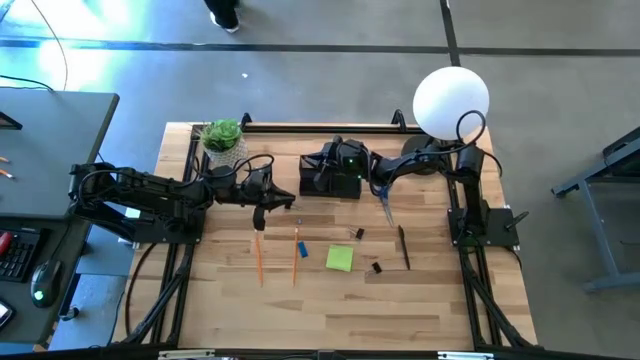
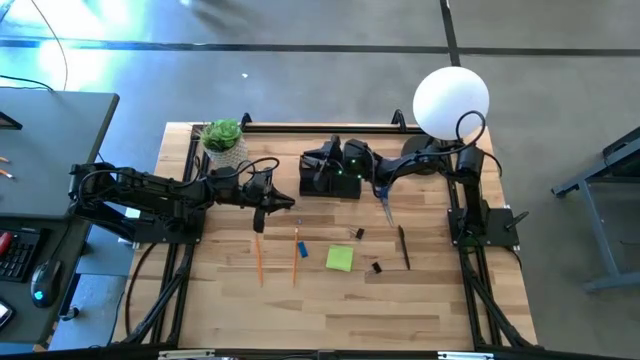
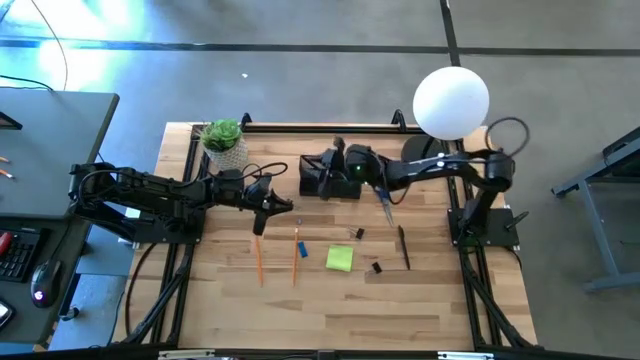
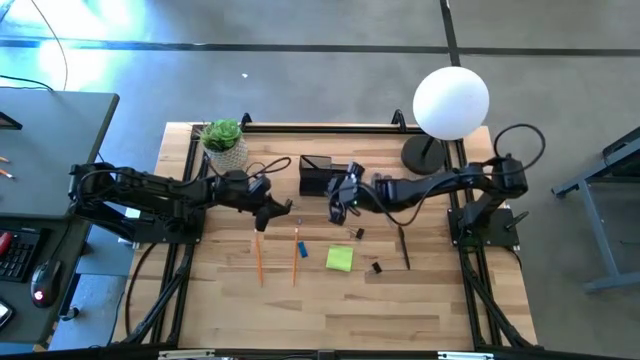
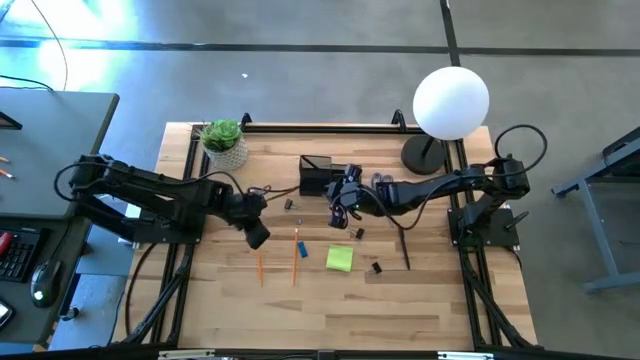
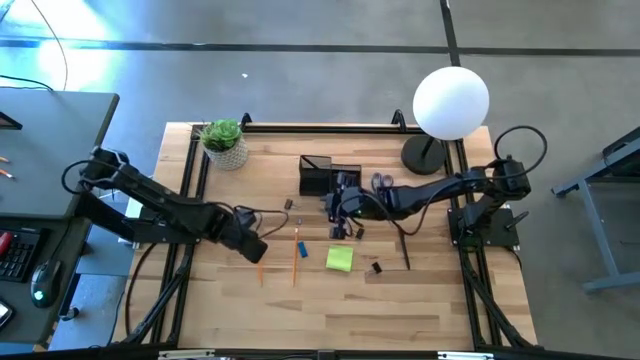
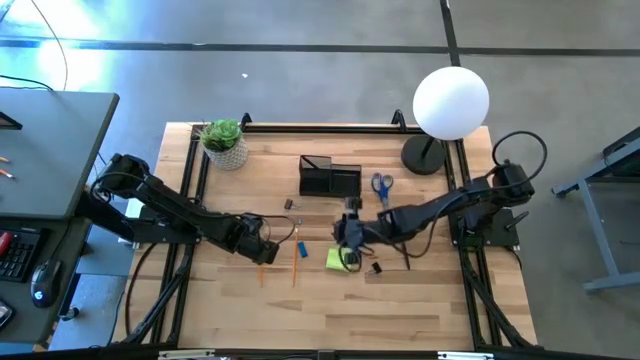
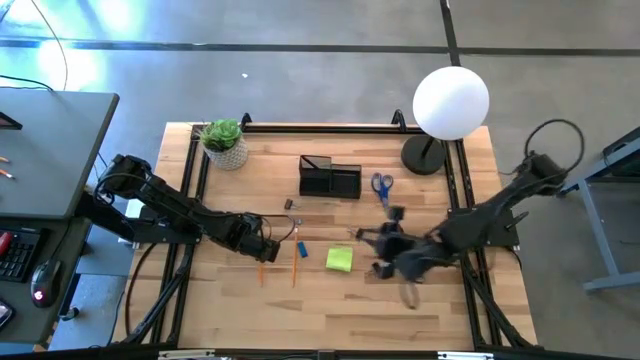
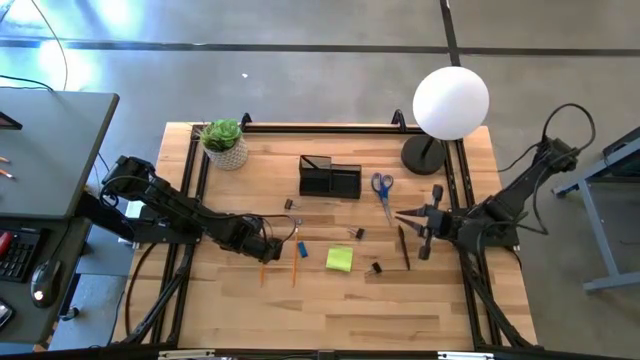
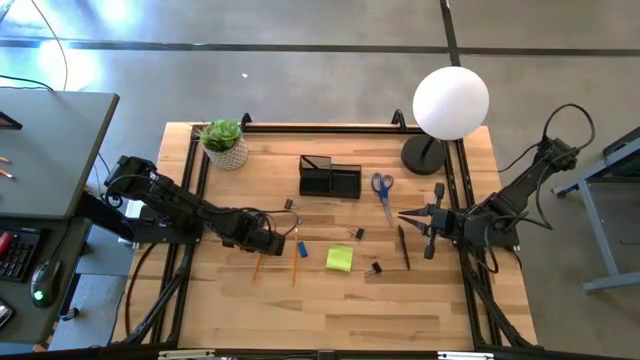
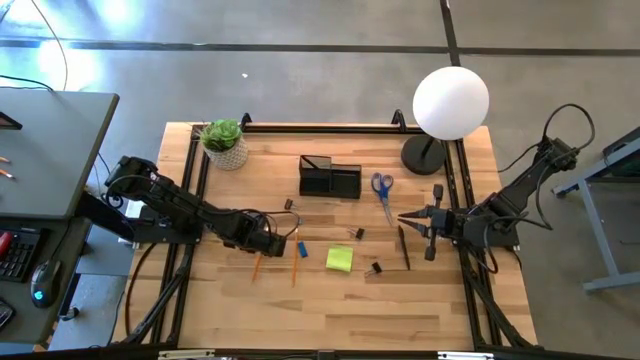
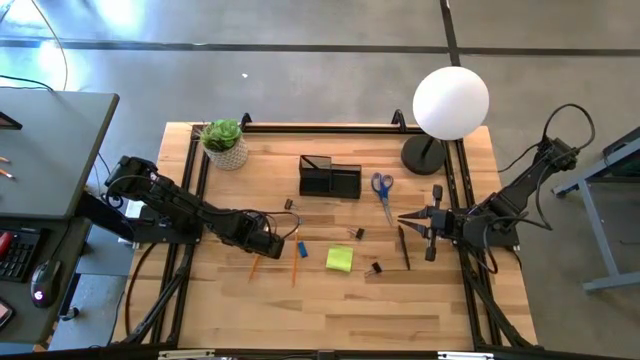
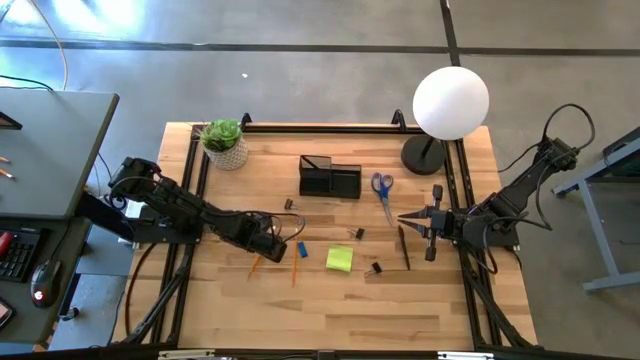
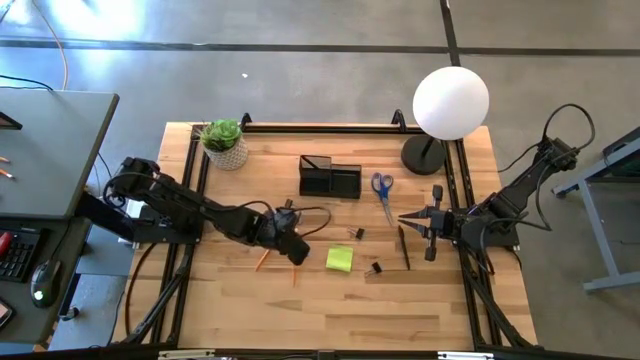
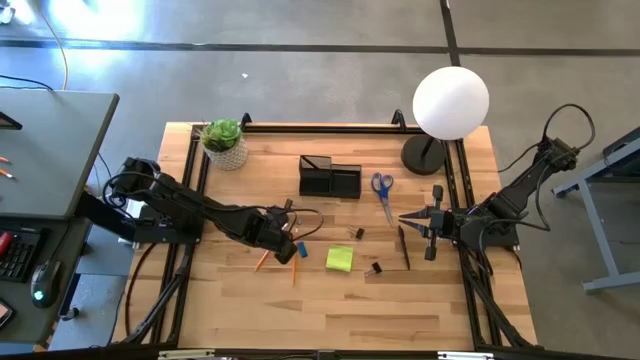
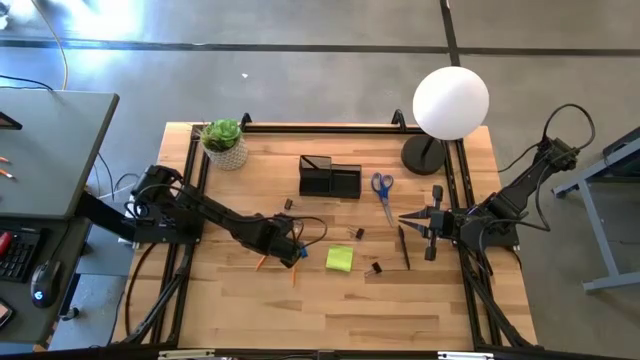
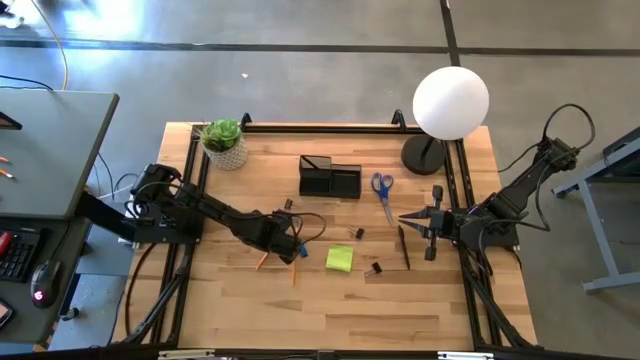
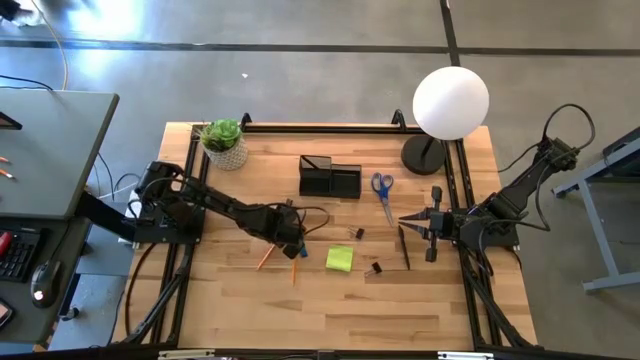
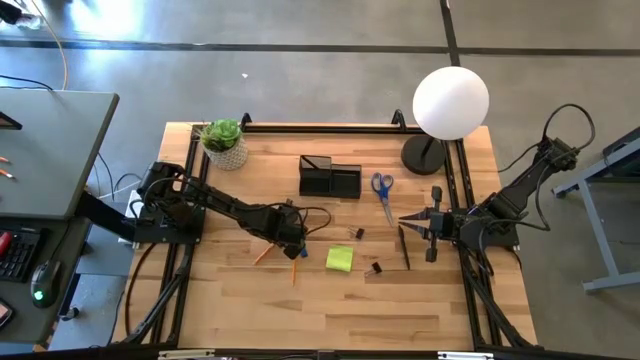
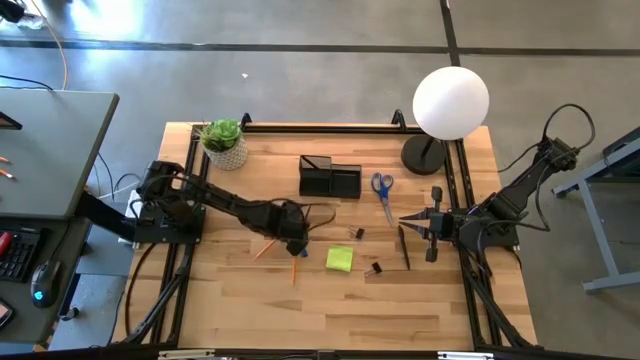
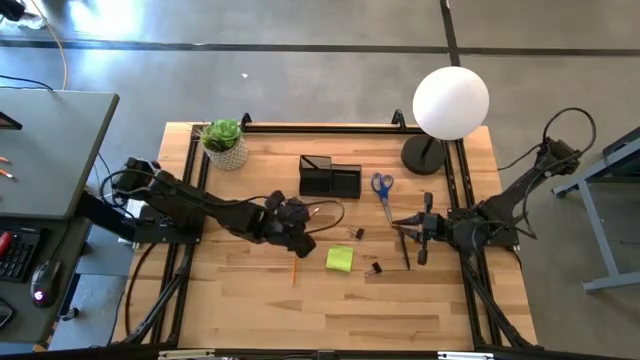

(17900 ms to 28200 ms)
Task: Pick and place office supplies into organizer
Put the orange pencil into the black desk organizer

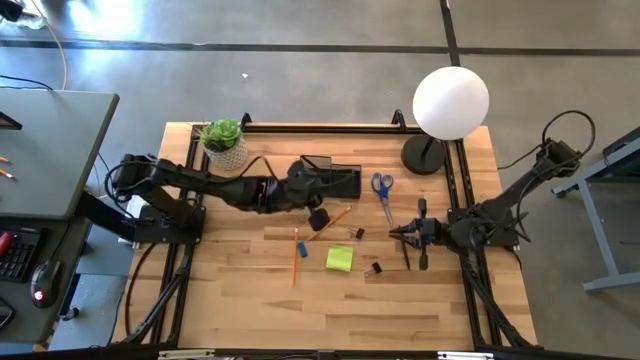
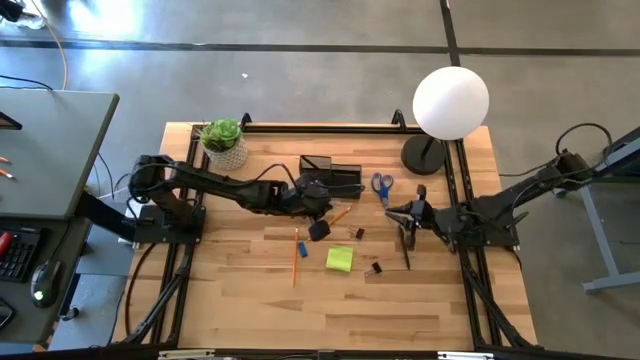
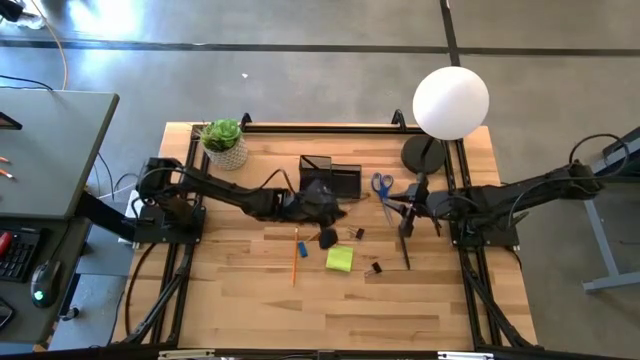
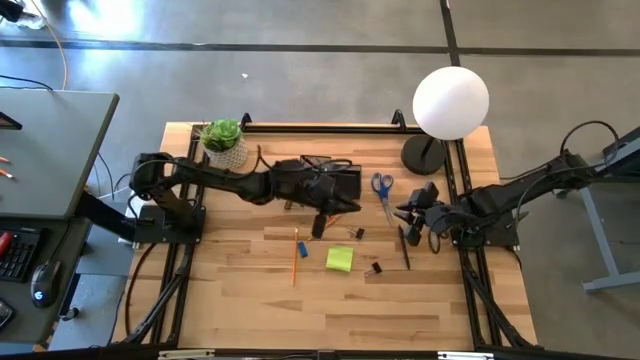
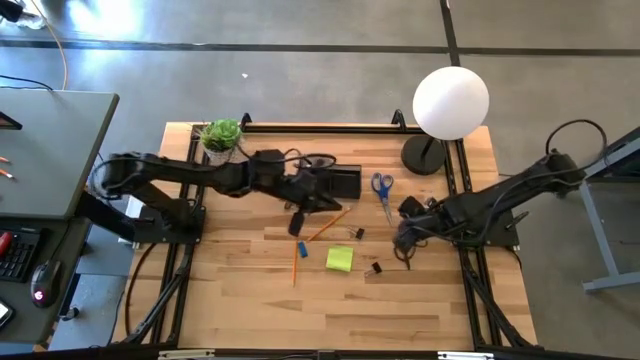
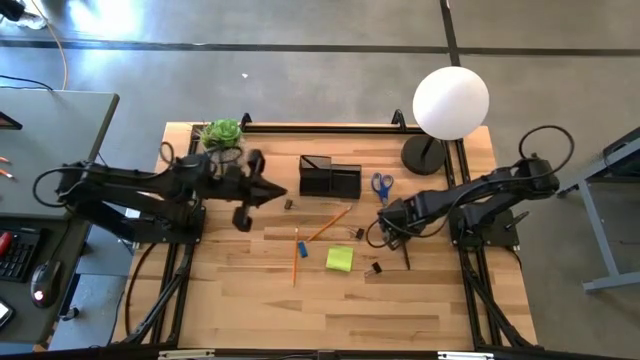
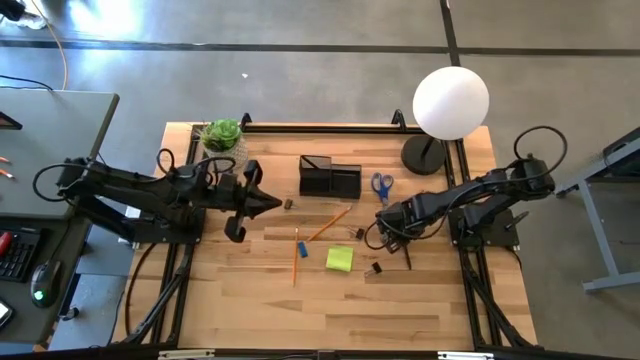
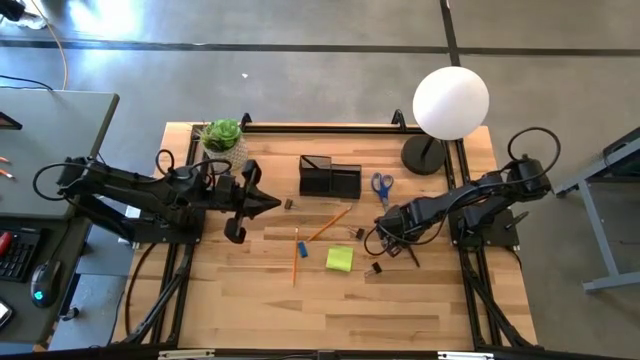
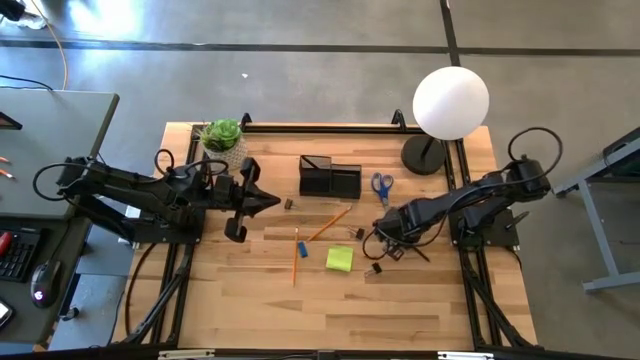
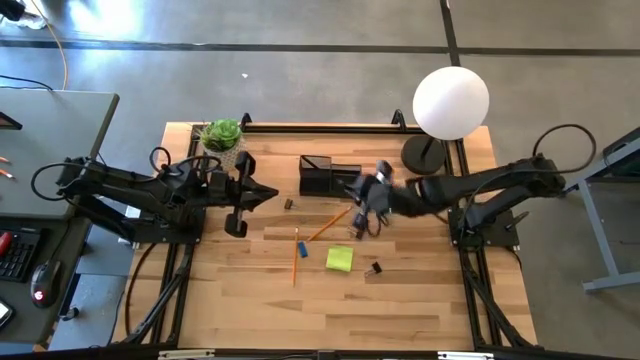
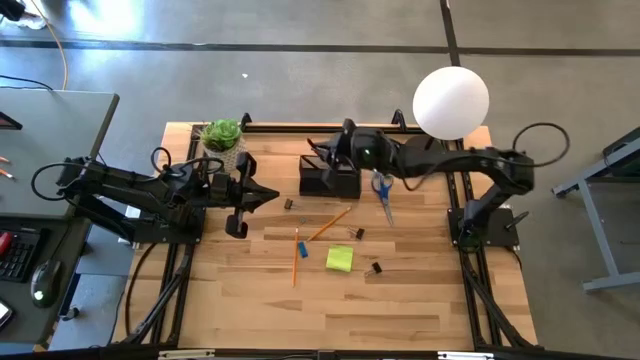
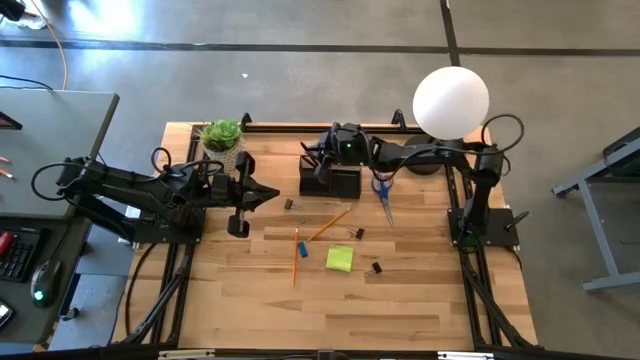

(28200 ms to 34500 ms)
Put the black pen into the black desk organizer

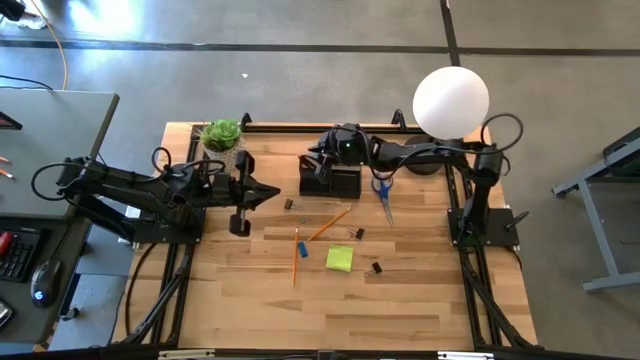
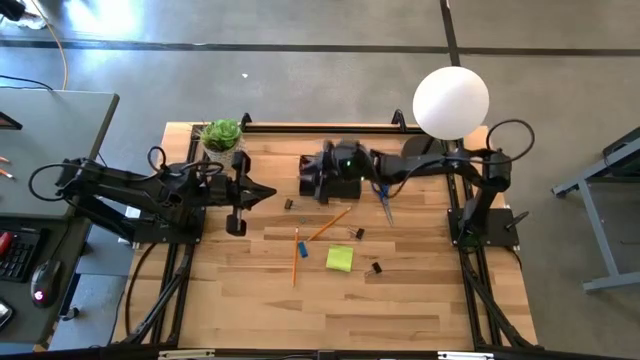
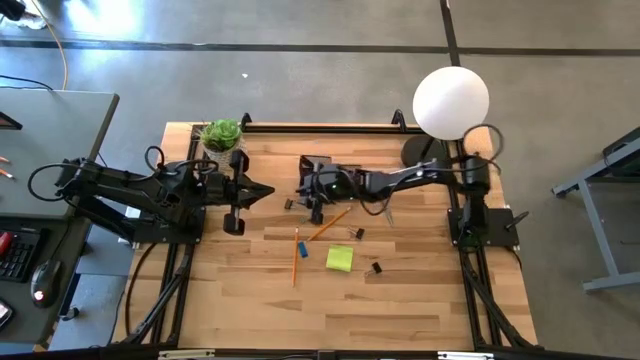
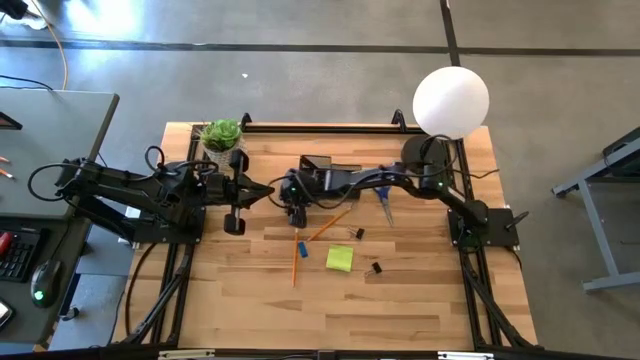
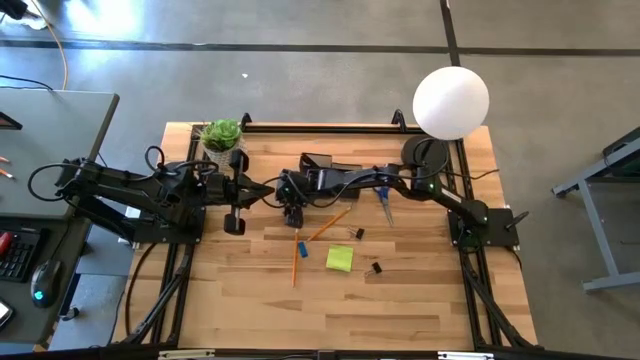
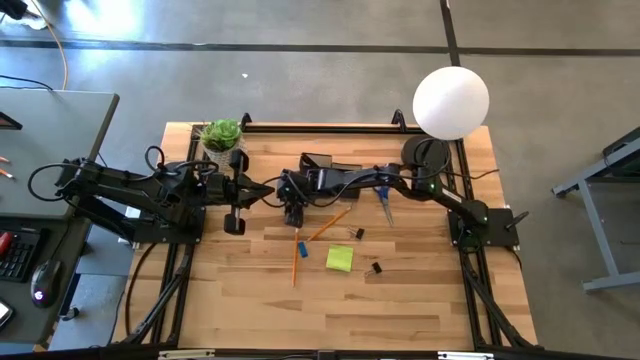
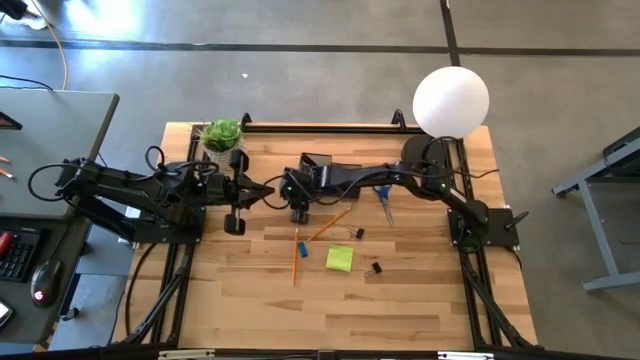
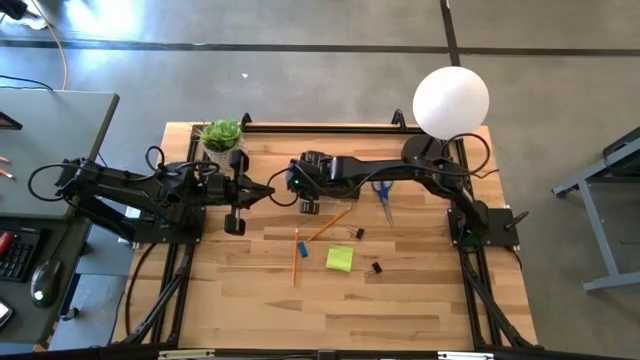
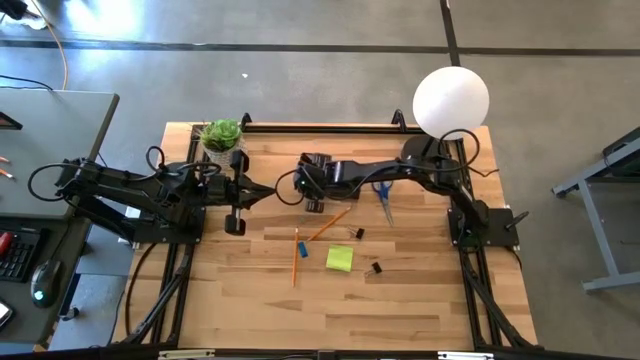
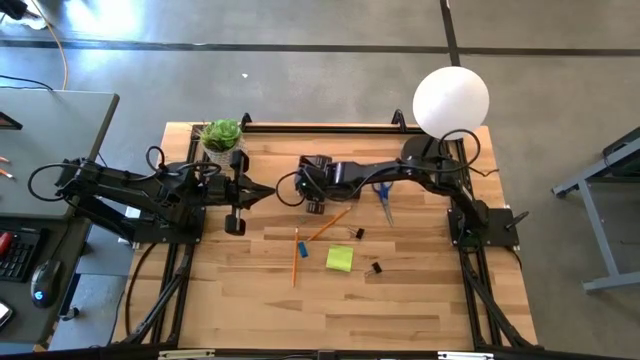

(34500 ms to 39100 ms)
Put the black binder clip into the black desk organizer

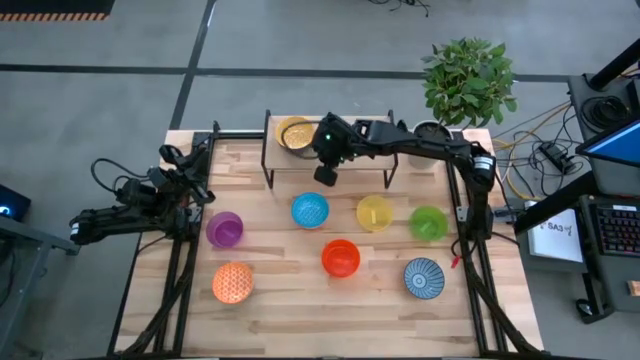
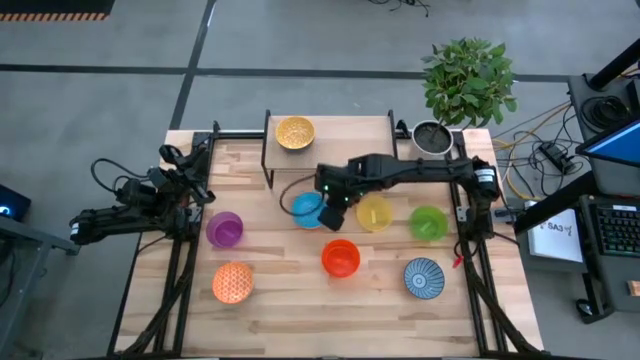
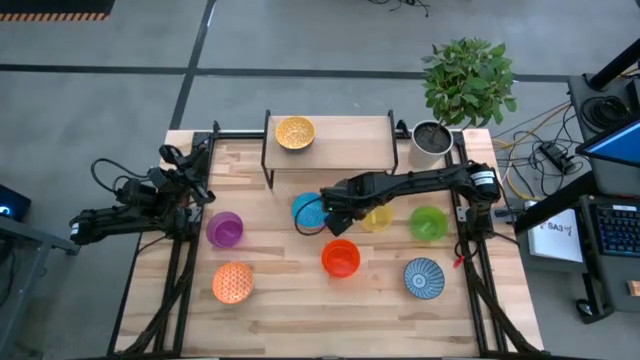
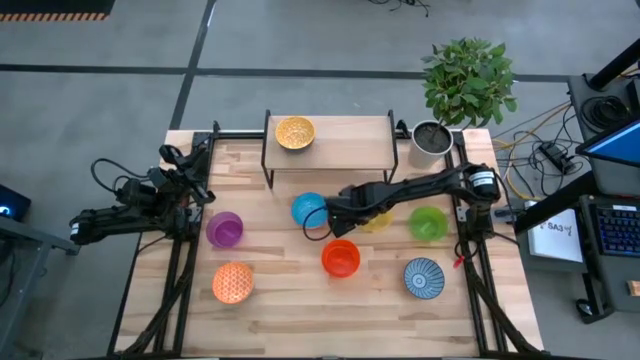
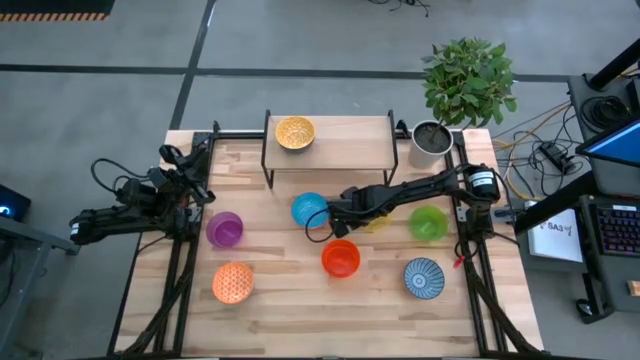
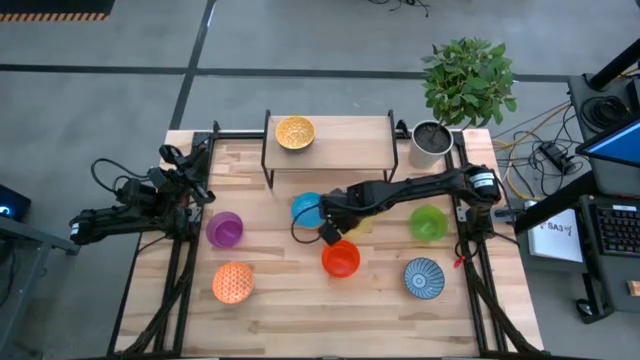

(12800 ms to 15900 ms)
Task: Place and stack bowls onto a shelf
Put the light yellow bowl on the shelf
